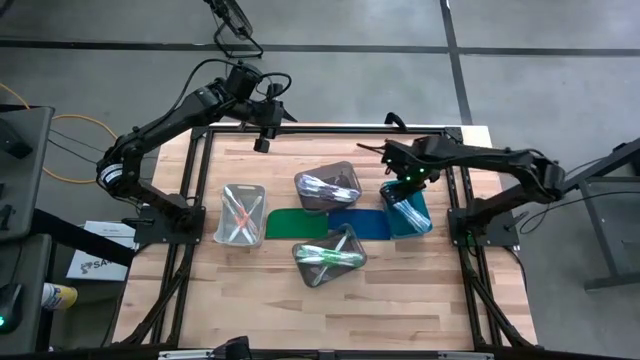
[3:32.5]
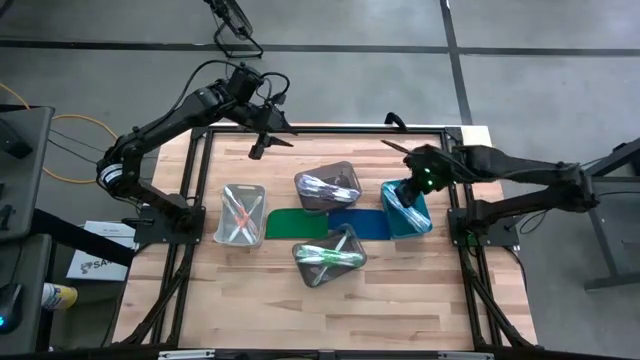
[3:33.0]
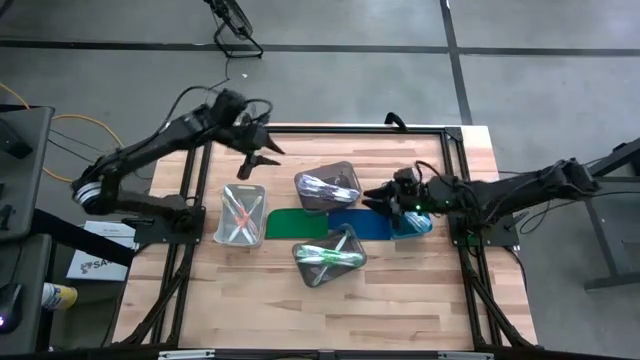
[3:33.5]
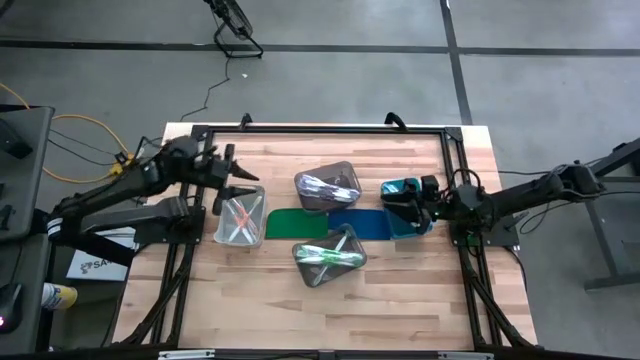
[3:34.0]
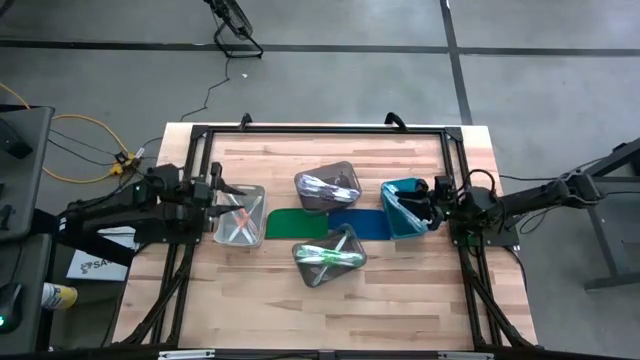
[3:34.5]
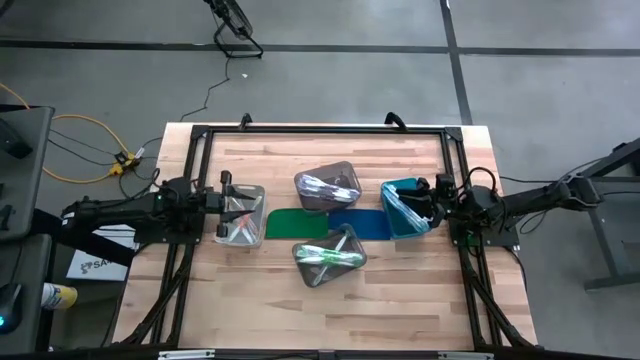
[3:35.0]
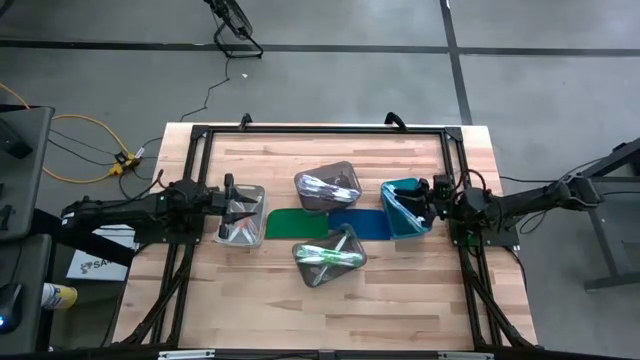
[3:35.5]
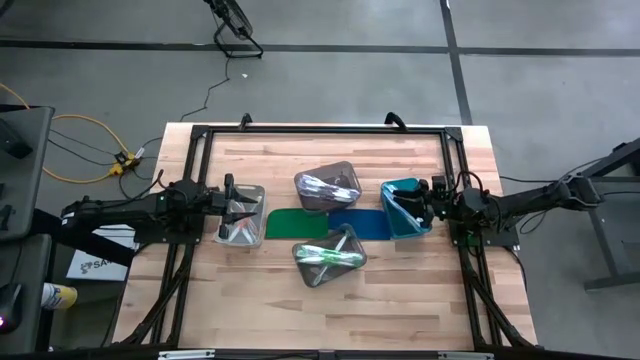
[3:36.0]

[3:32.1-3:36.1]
Task: Pick & Place Toothbrushes
Return to Home Position

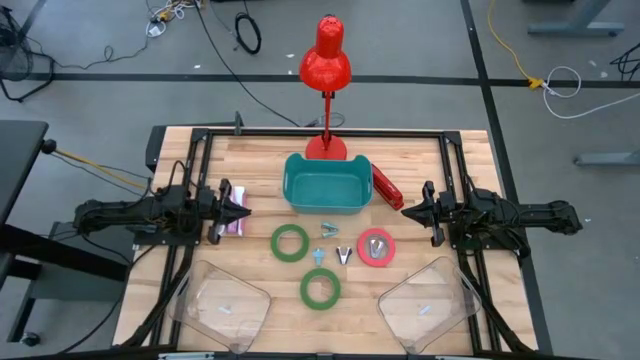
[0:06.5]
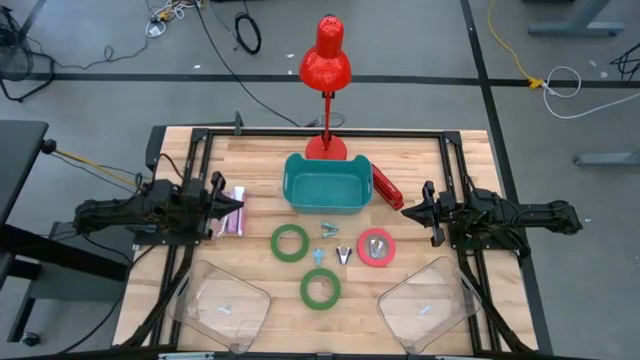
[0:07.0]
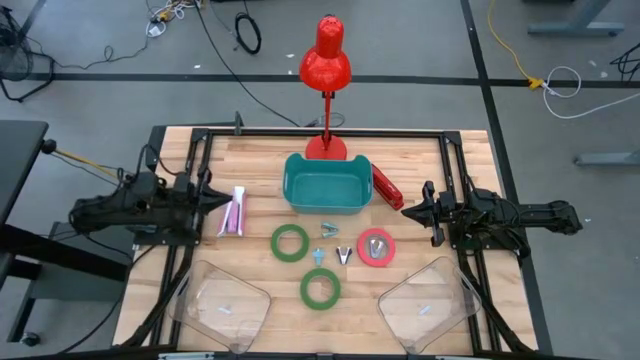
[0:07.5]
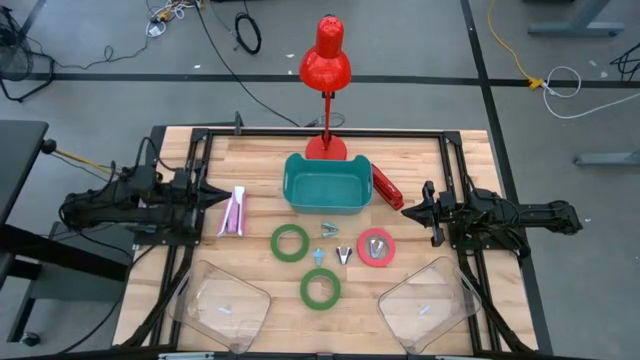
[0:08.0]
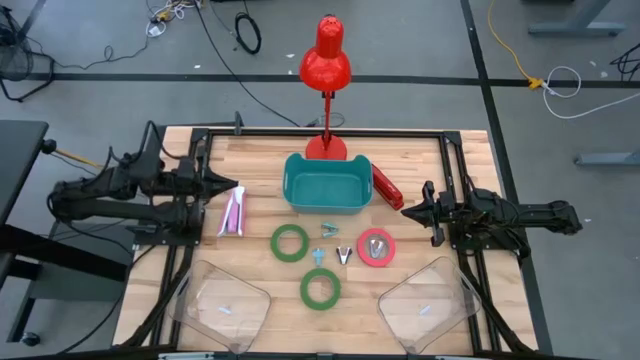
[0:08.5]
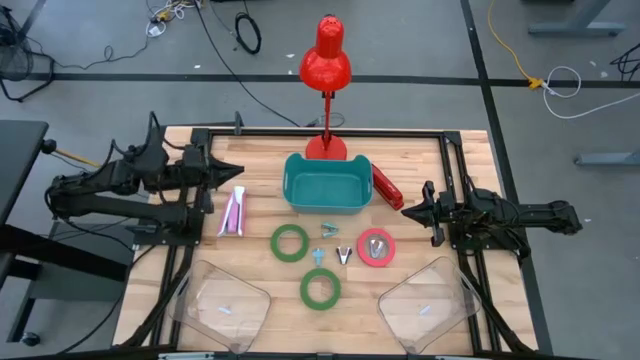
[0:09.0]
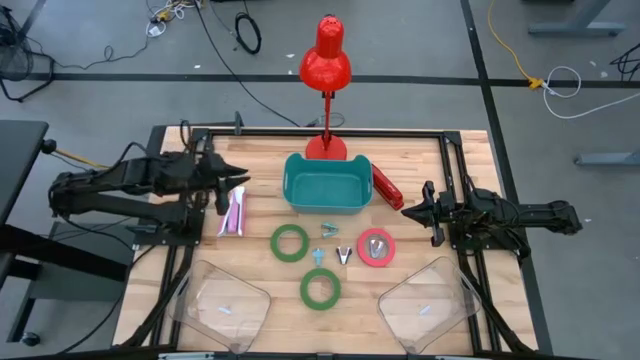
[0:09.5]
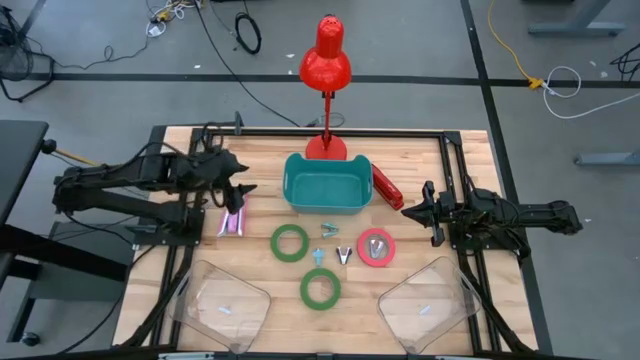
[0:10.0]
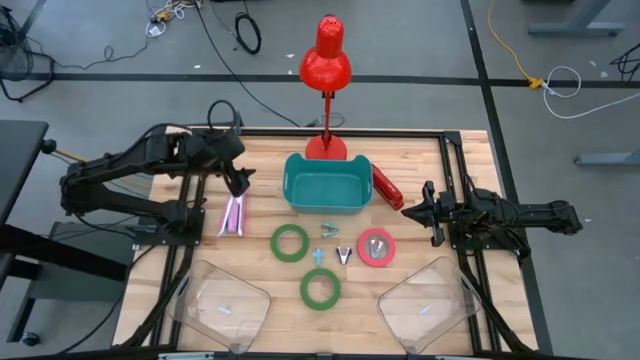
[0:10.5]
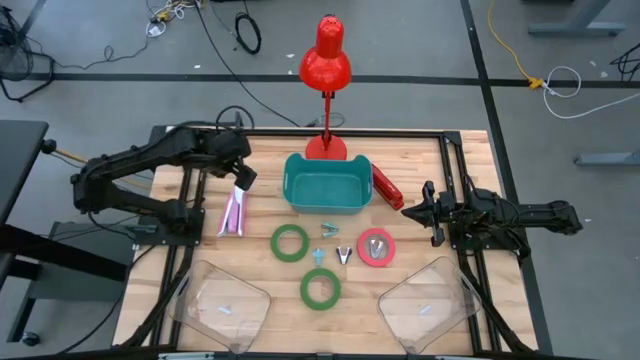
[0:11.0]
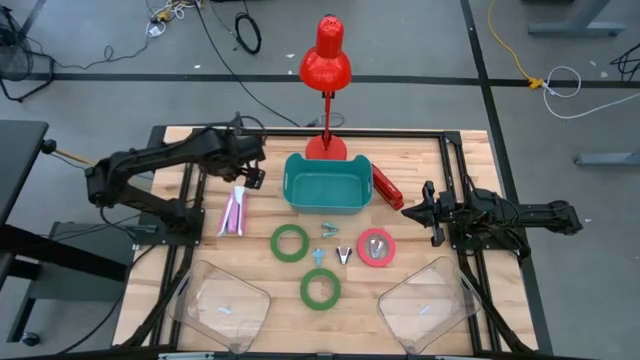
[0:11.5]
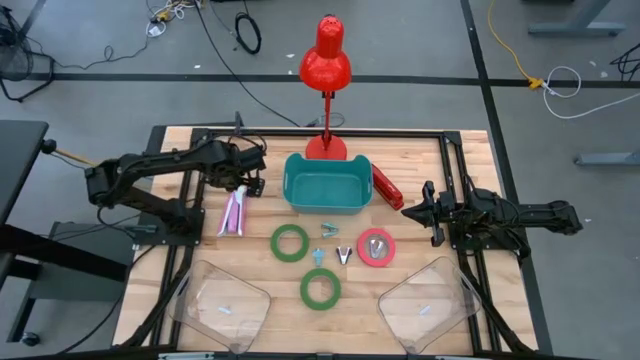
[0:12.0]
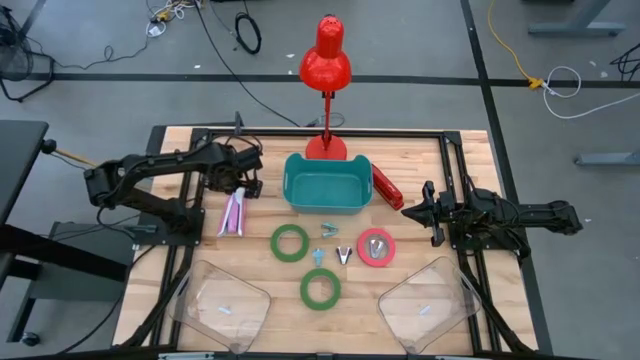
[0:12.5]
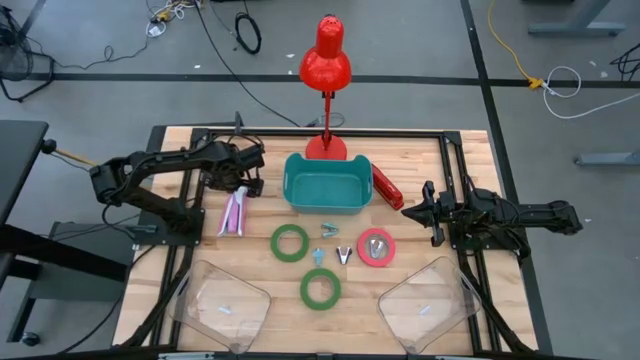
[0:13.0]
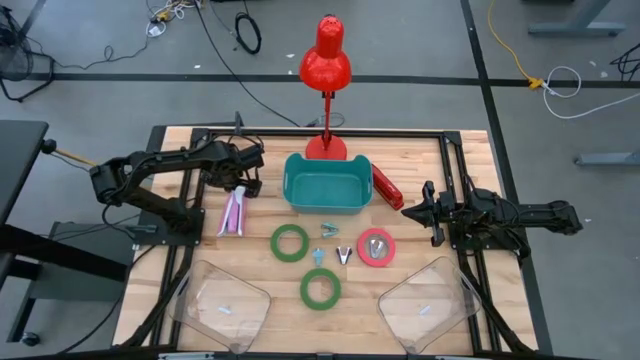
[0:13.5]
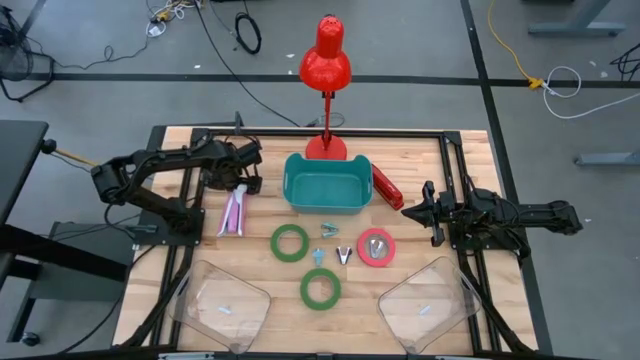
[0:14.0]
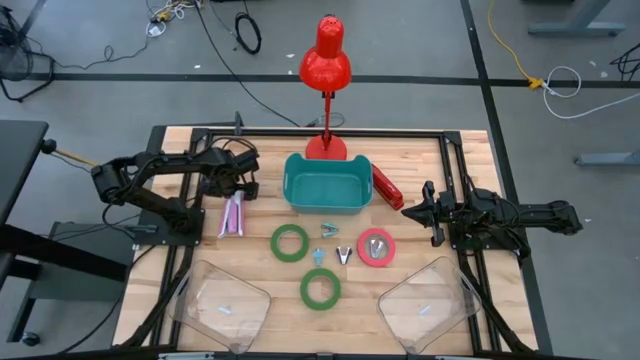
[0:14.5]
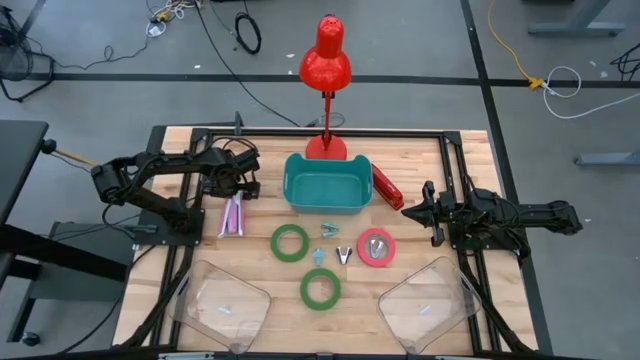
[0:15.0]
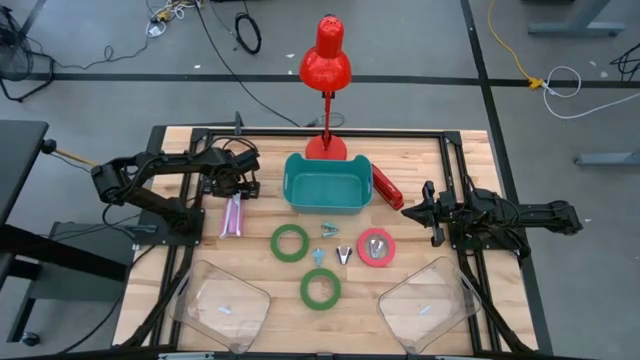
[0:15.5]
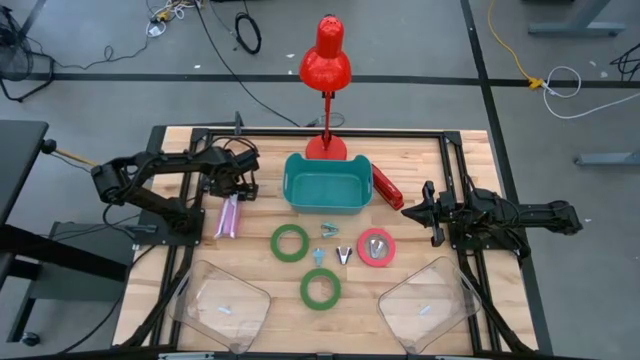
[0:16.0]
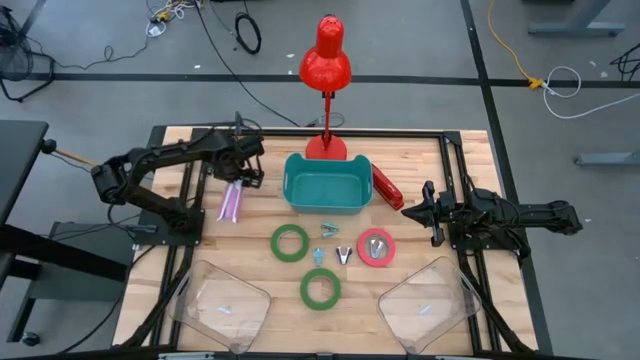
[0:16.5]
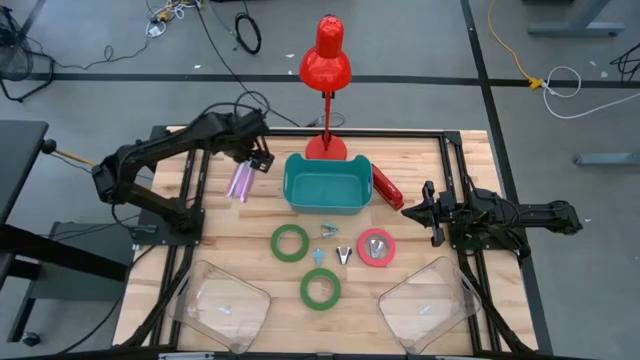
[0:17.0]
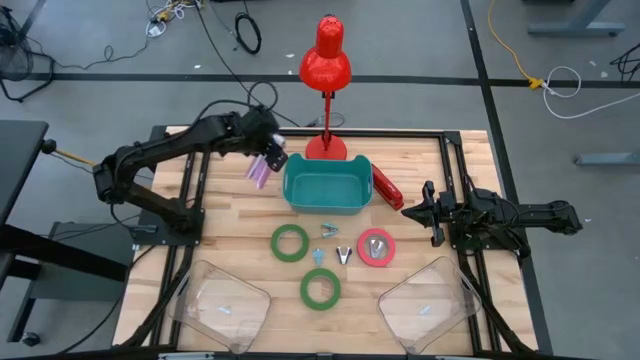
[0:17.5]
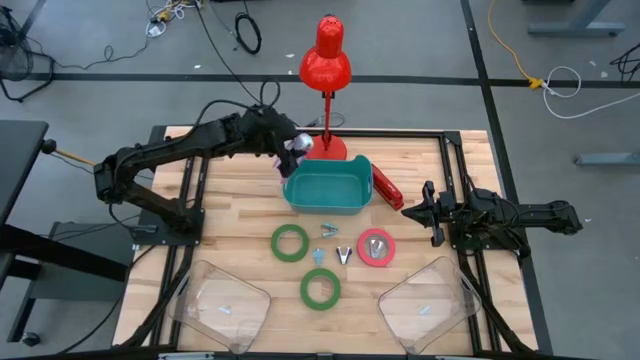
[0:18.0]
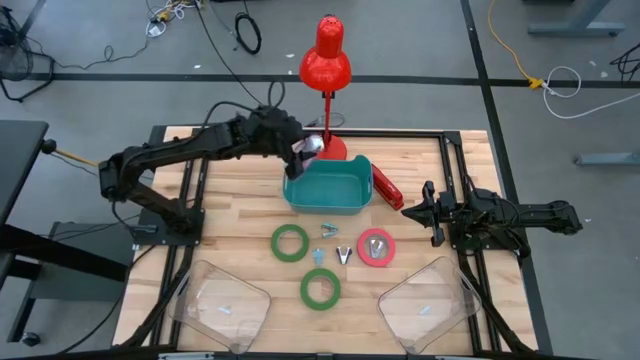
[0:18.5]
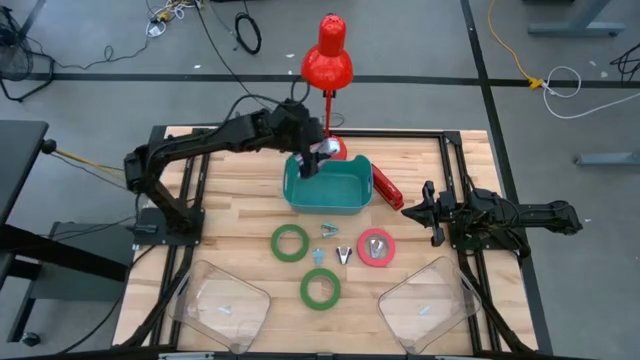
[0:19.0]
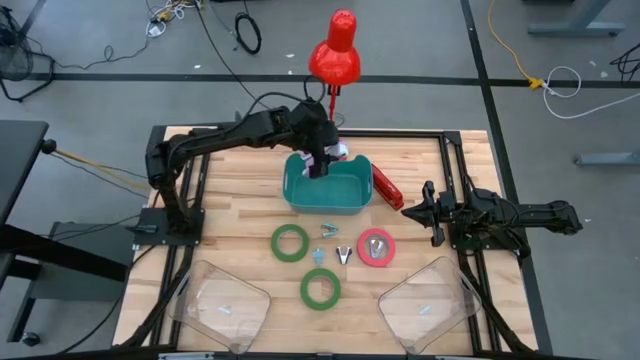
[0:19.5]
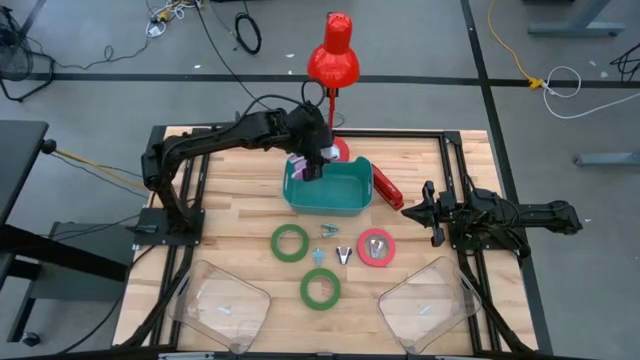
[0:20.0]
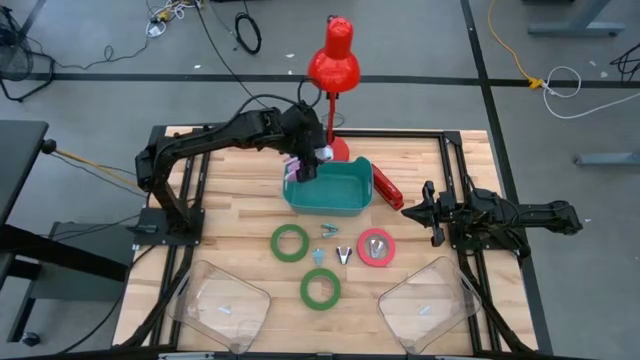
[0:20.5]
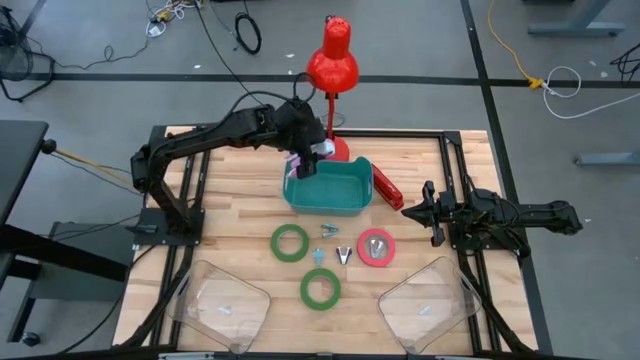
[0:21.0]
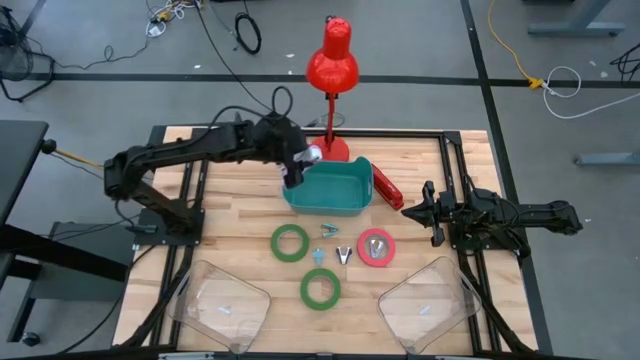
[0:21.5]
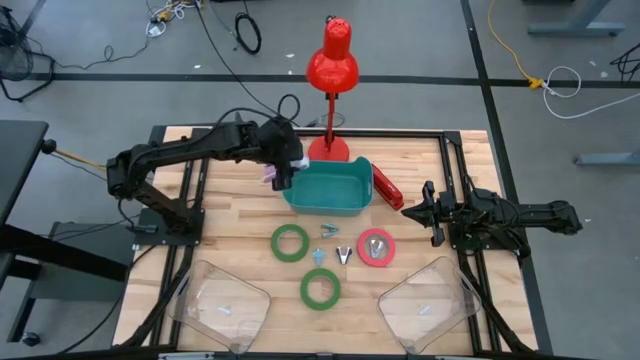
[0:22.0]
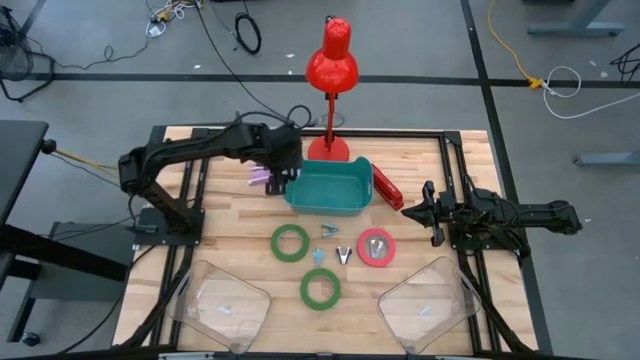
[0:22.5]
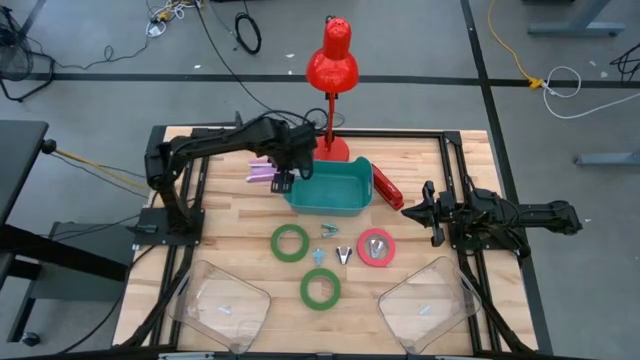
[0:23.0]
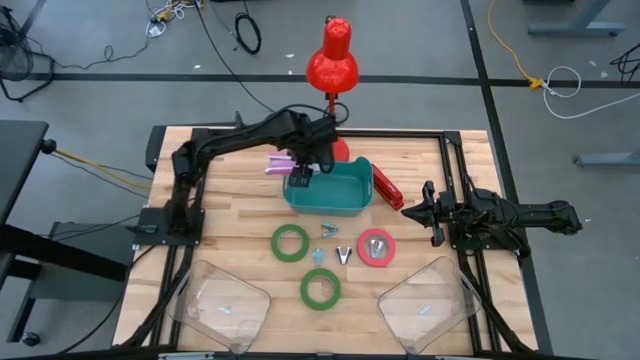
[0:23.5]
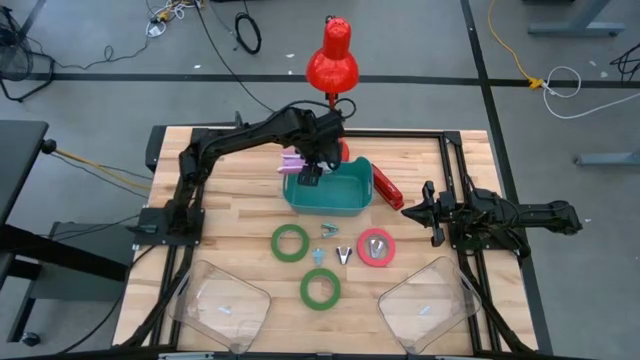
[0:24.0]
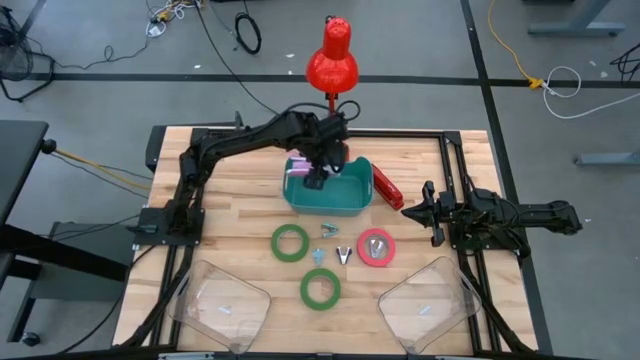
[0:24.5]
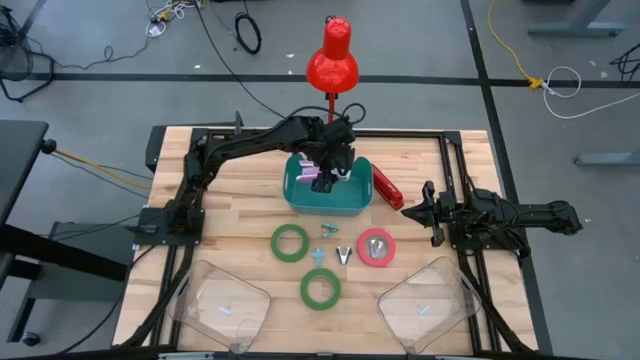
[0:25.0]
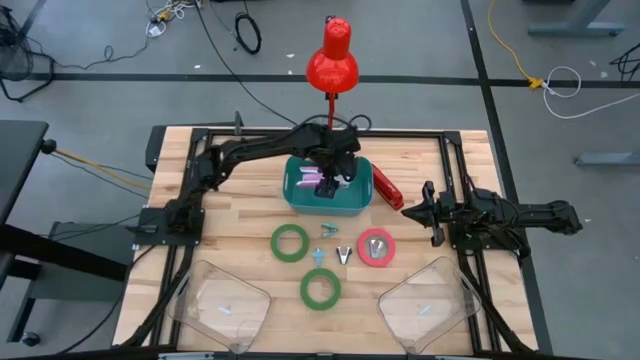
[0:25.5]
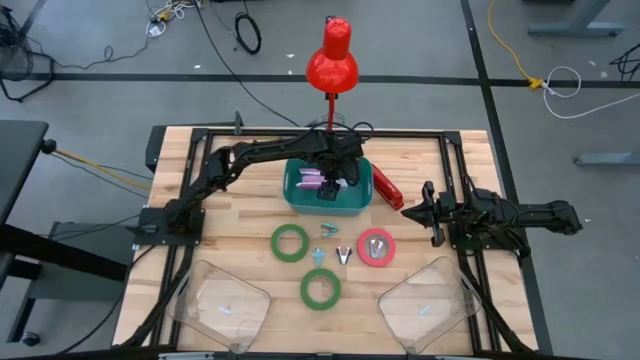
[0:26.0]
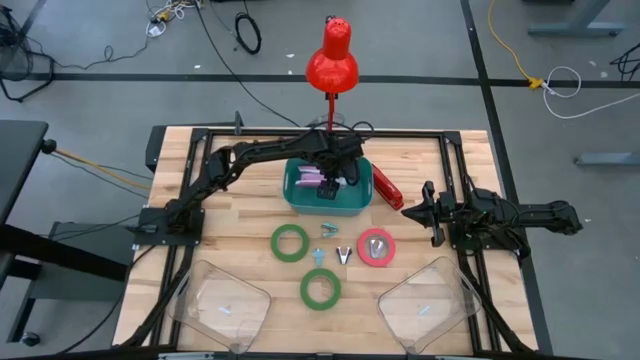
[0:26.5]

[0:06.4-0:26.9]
Task: Pick and place Stapler, Stapler remover, tape
Put the pink stapler in the blue bin
